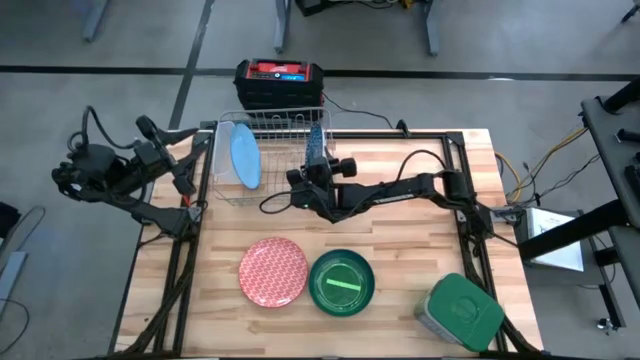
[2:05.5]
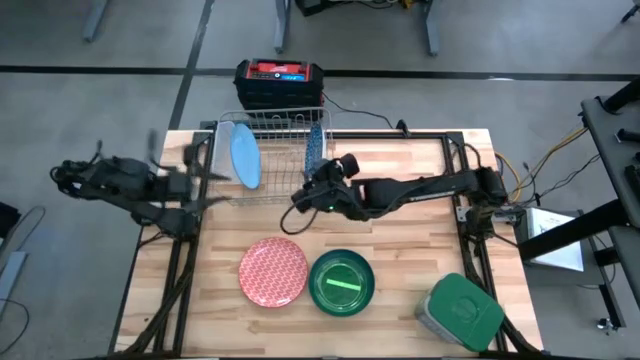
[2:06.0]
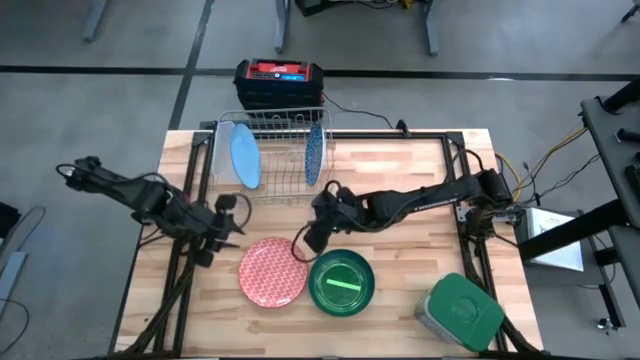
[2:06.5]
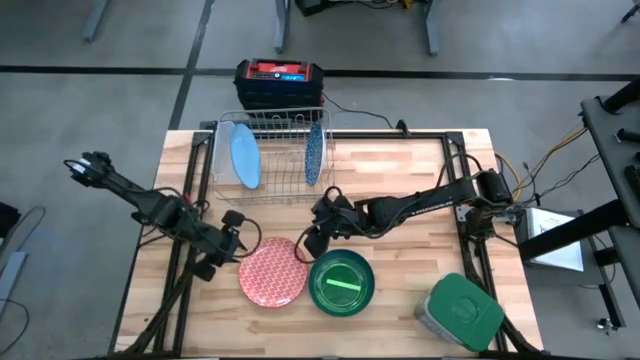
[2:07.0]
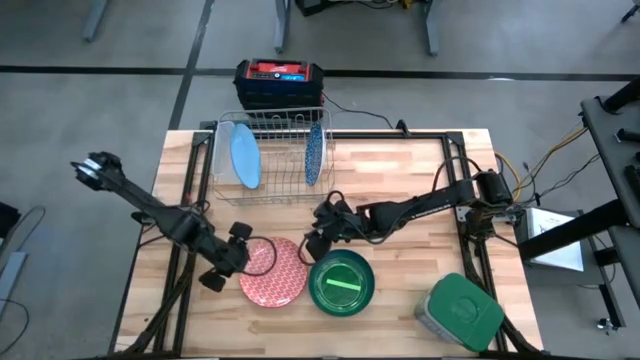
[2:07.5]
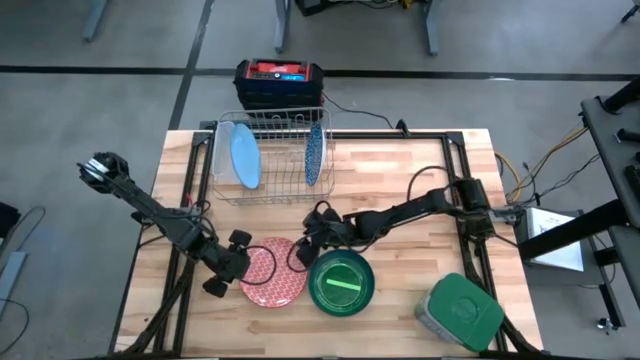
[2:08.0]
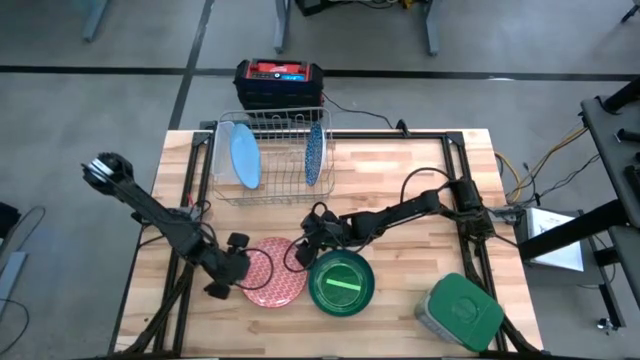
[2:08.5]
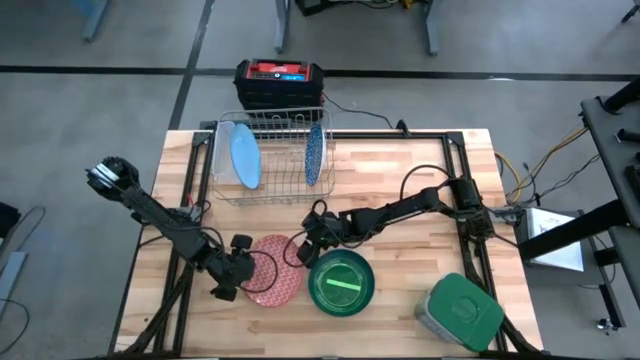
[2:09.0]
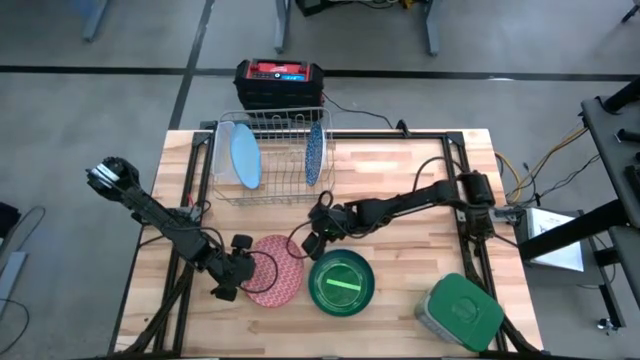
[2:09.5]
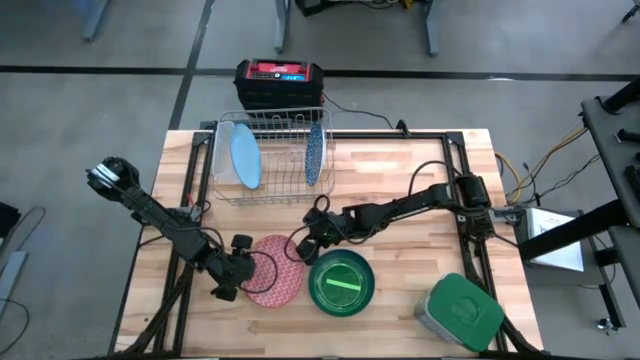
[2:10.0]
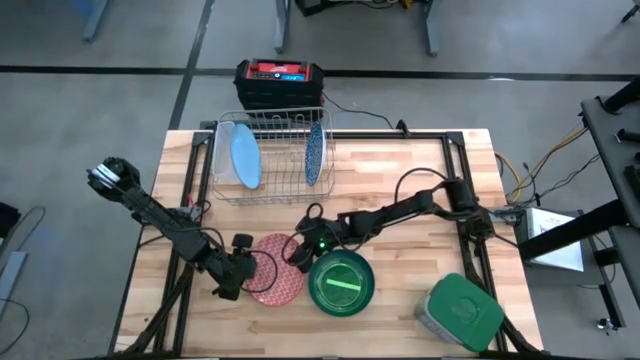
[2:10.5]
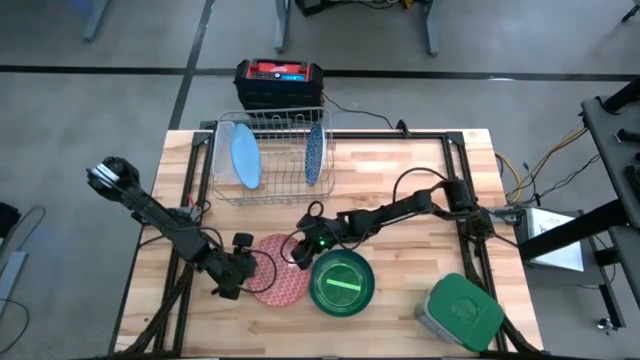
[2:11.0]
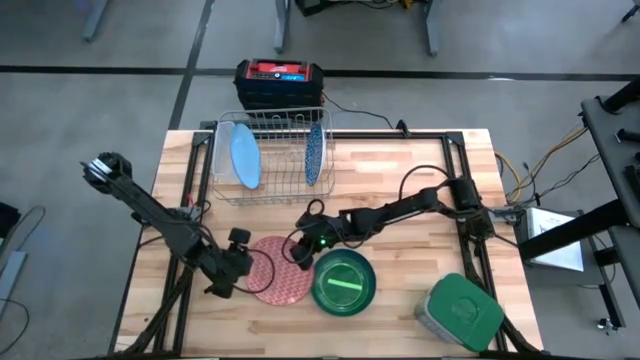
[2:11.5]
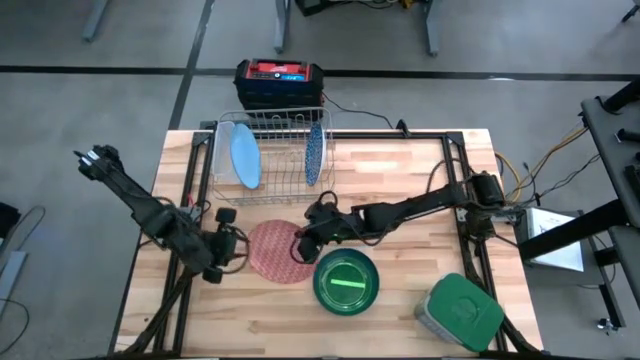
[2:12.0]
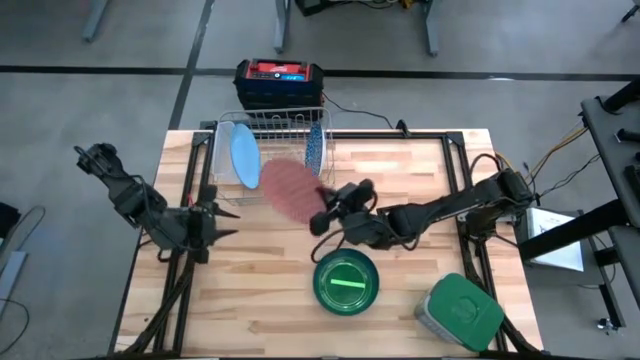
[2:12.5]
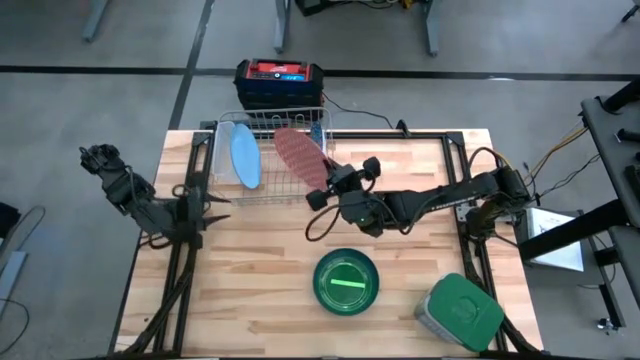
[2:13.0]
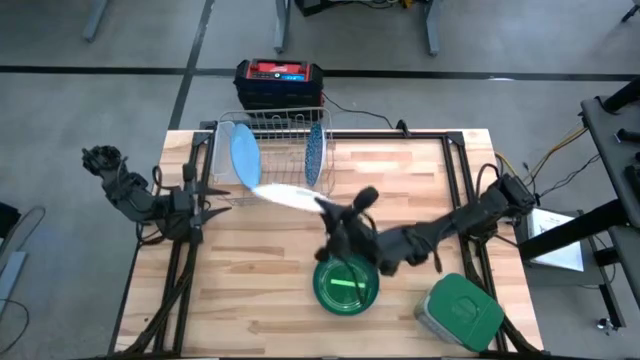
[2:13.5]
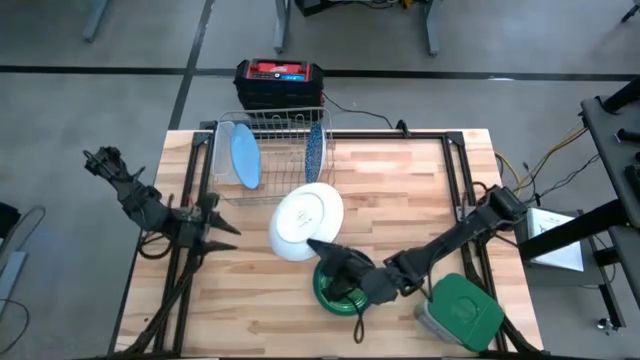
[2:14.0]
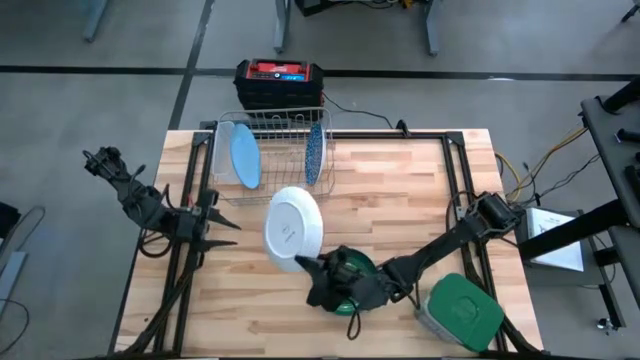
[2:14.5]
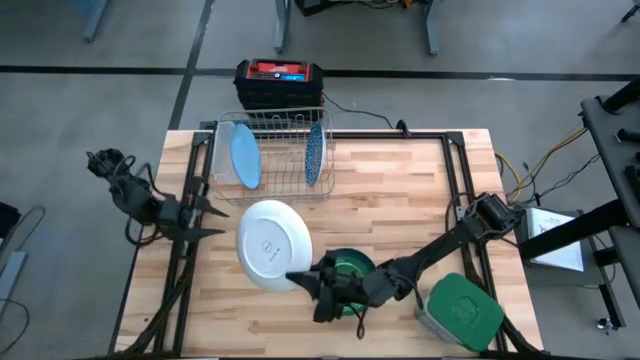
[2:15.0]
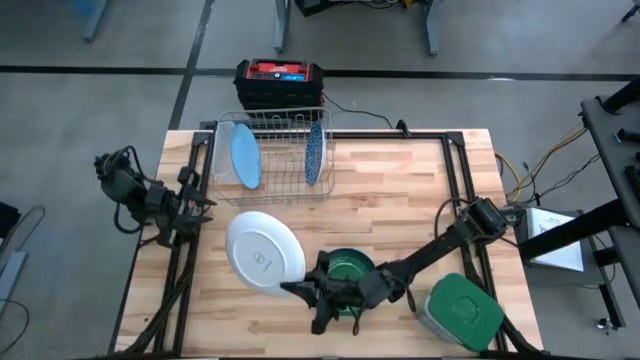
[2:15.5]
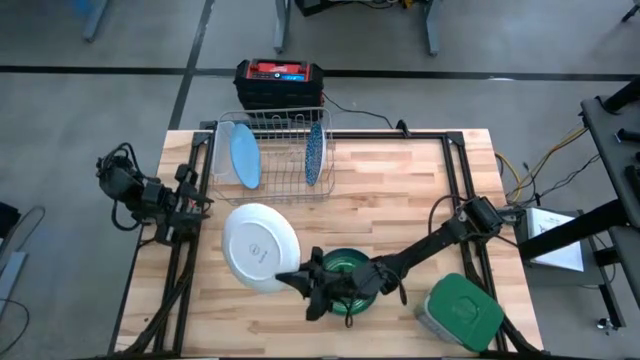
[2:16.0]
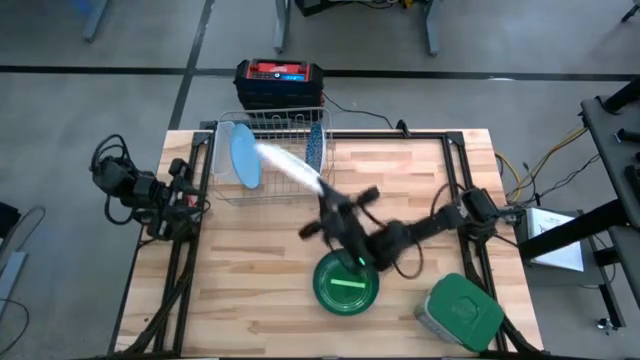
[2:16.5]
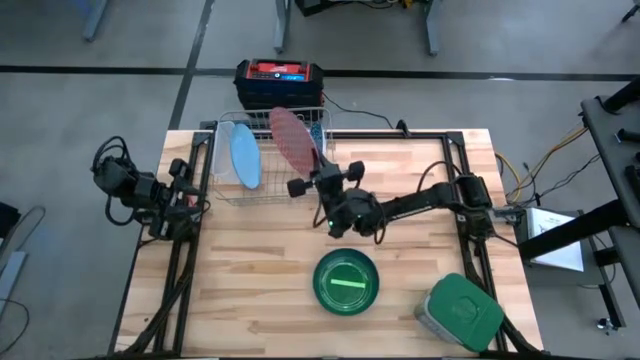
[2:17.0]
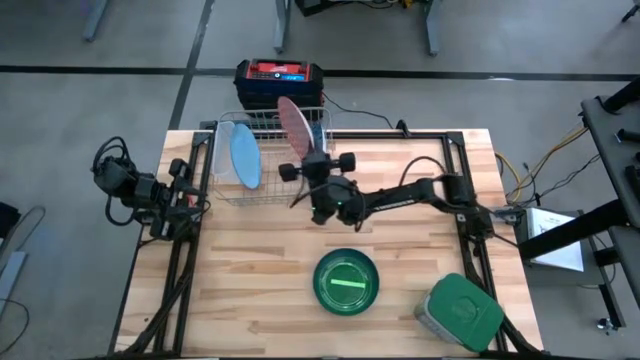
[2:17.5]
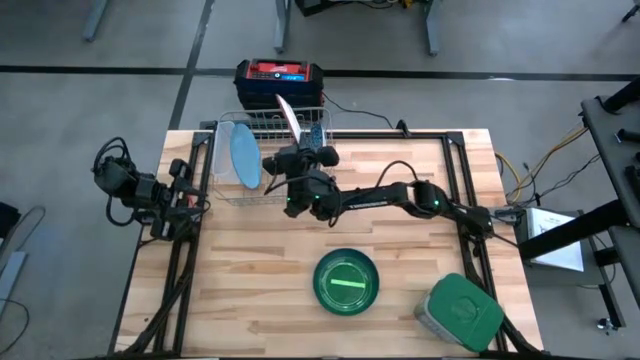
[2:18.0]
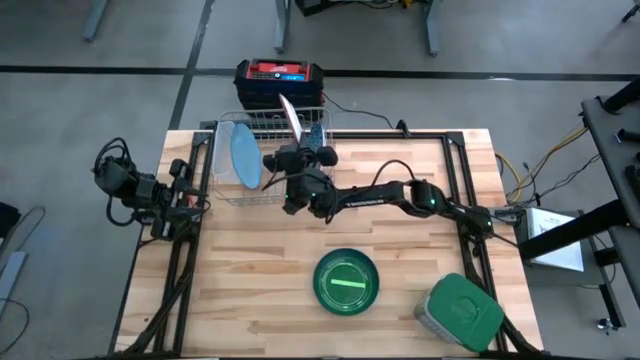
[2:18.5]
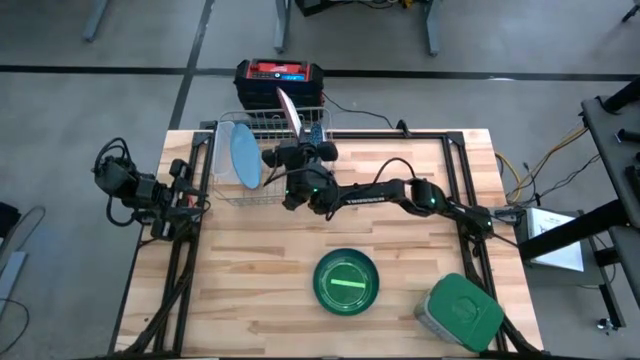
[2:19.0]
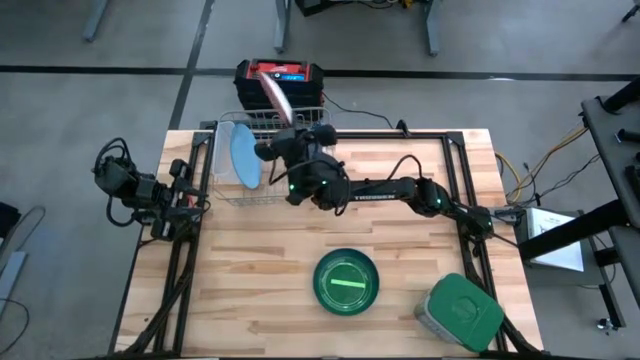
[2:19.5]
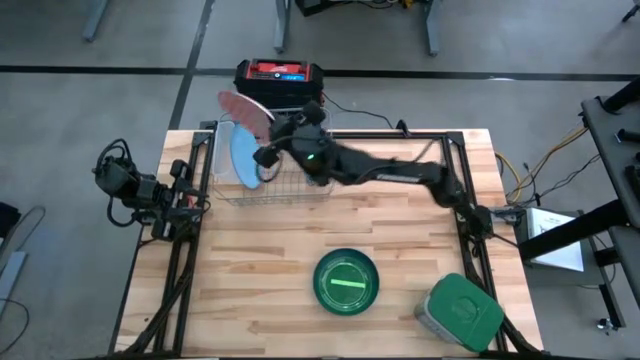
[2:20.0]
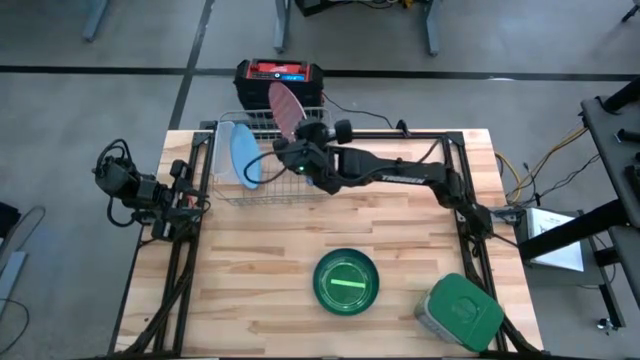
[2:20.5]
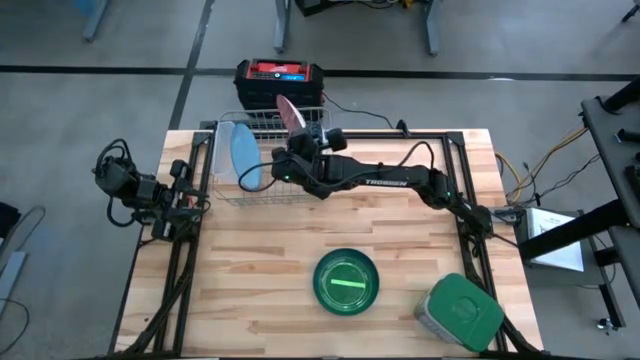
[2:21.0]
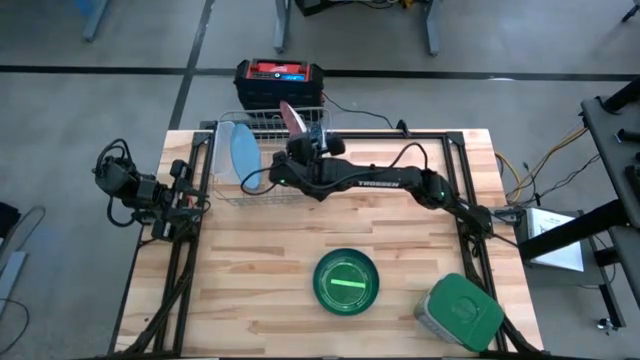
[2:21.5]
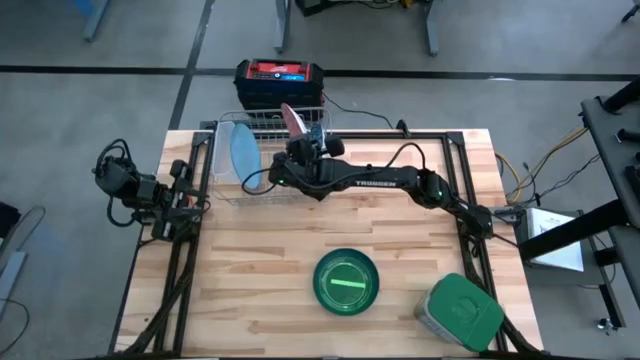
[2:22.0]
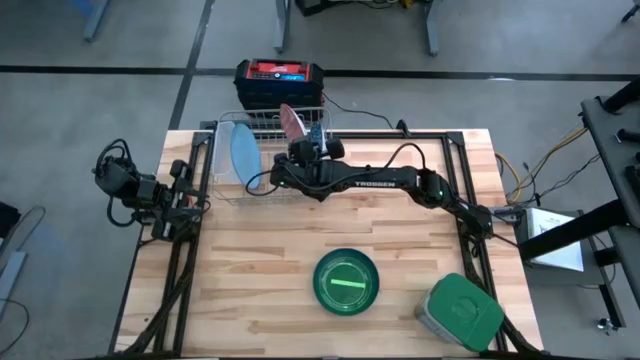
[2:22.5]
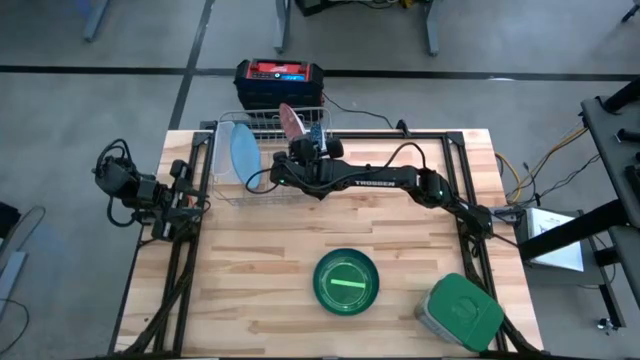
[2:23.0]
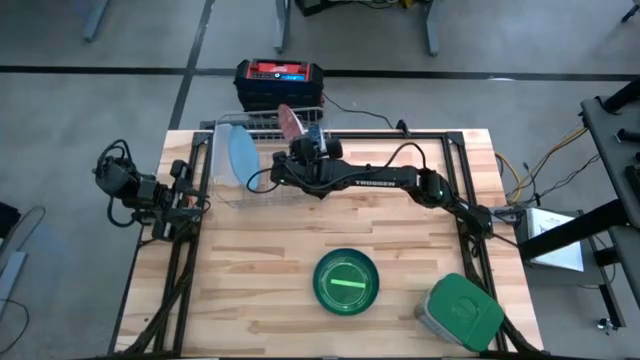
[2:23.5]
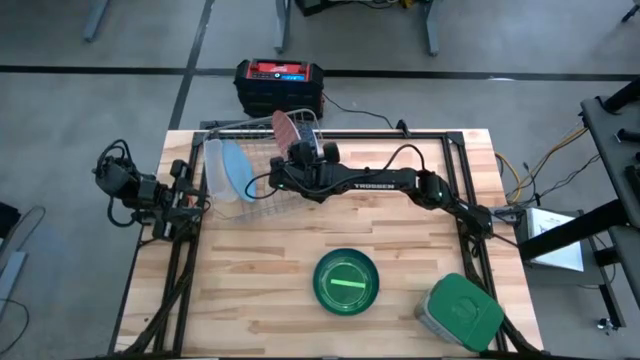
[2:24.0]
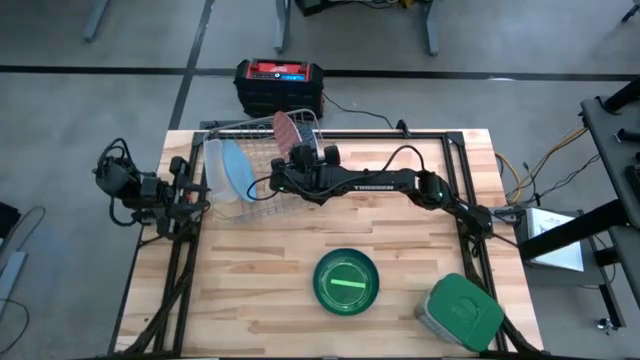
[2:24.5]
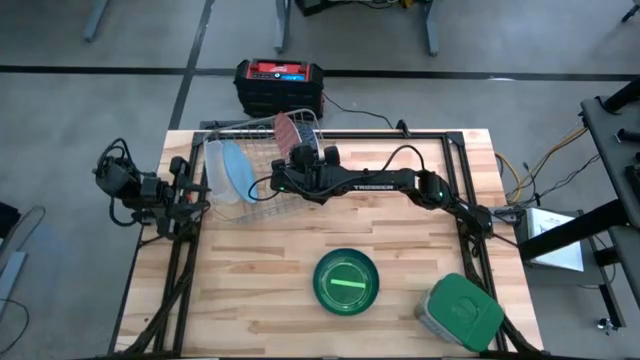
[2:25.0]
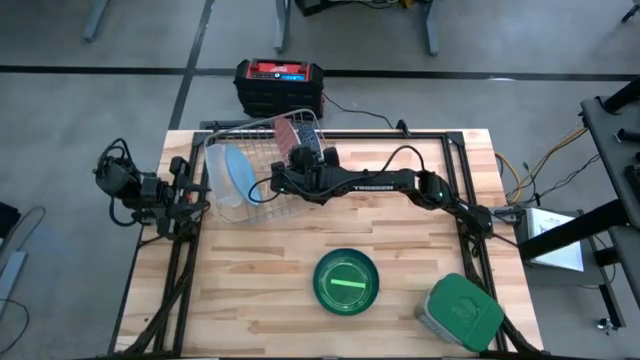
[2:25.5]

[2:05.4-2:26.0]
Task: Sort dishes
Put the red patterned plate into the dish rack

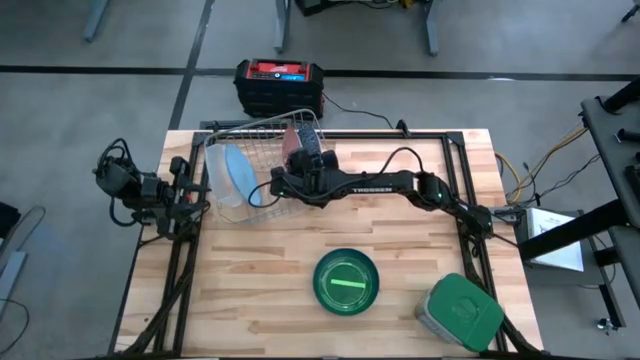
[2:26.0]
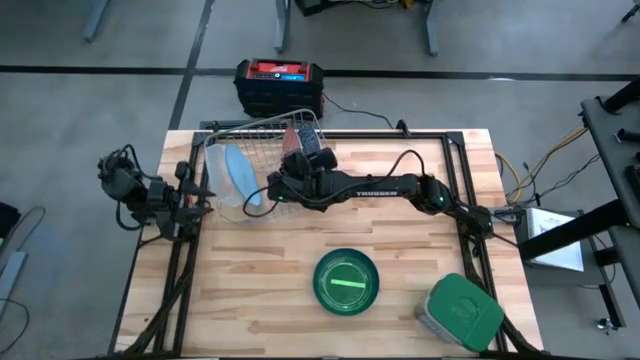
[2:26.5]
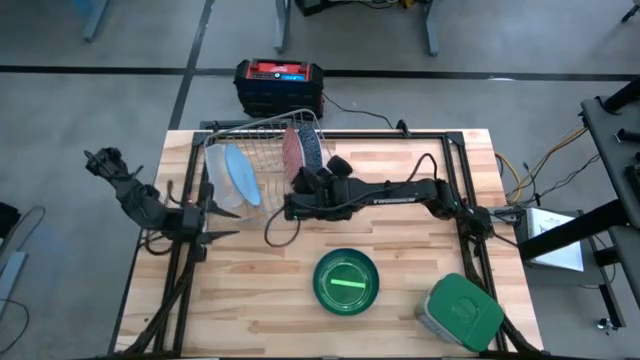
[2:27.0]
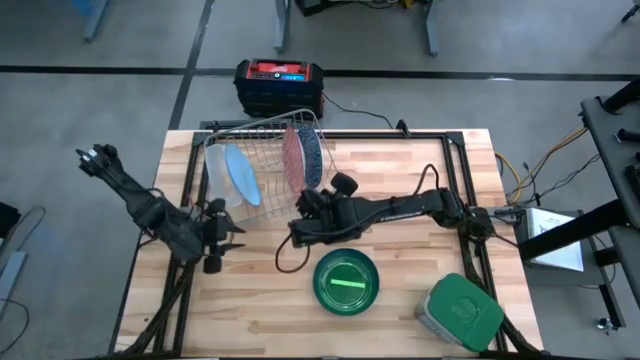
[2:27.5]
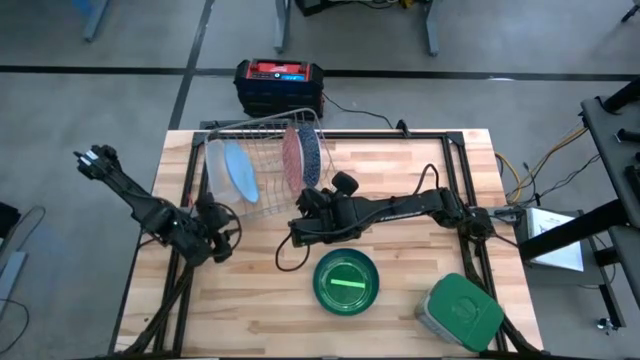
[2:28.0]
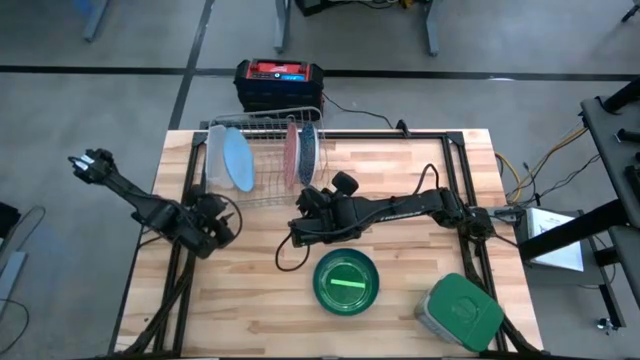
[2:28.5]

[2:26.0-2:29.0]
Adjust the dish rack
